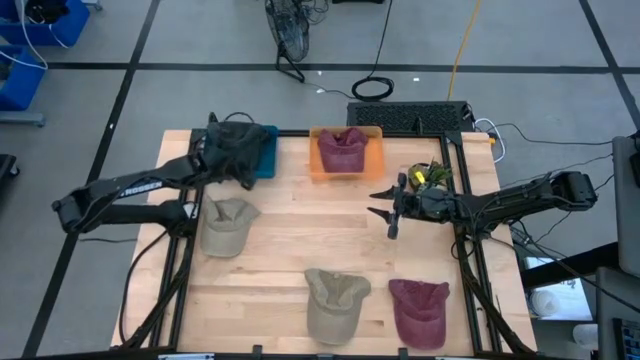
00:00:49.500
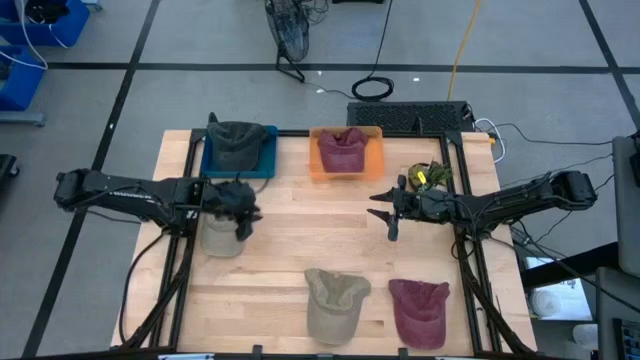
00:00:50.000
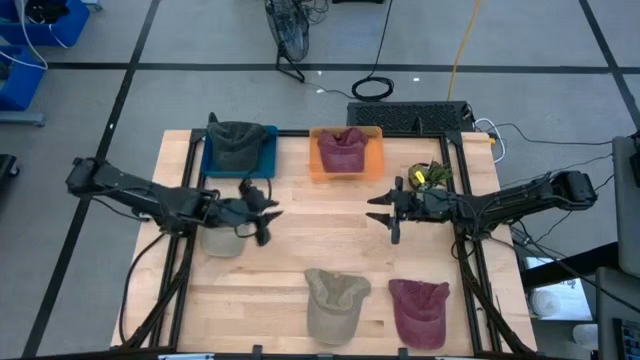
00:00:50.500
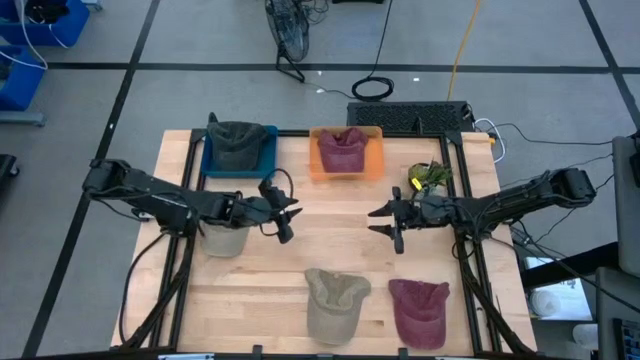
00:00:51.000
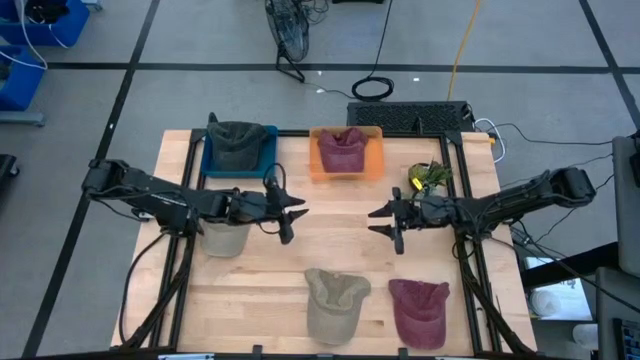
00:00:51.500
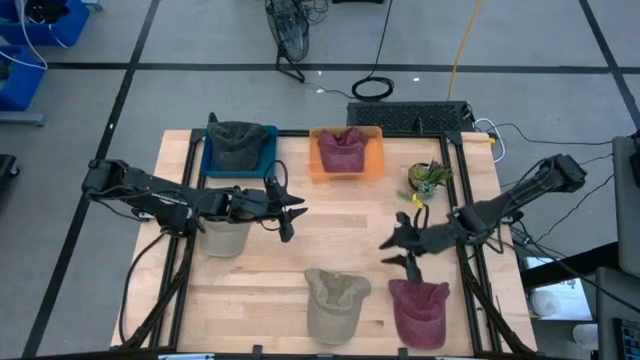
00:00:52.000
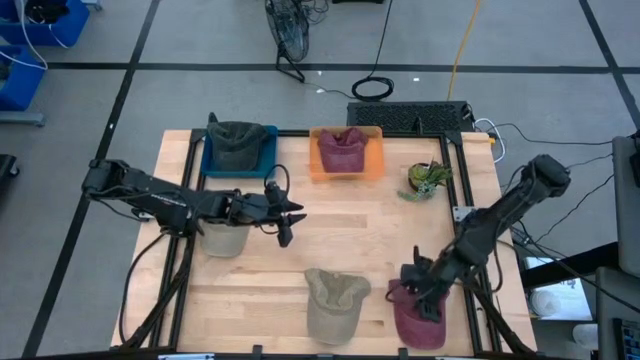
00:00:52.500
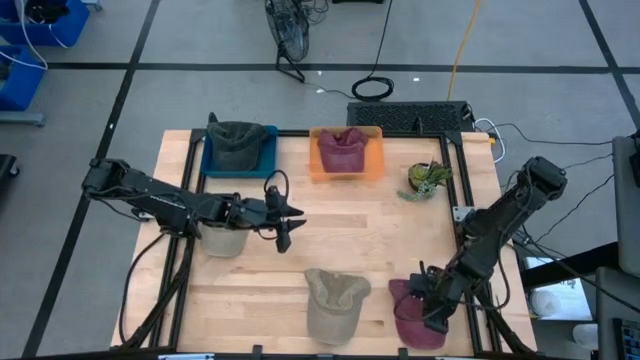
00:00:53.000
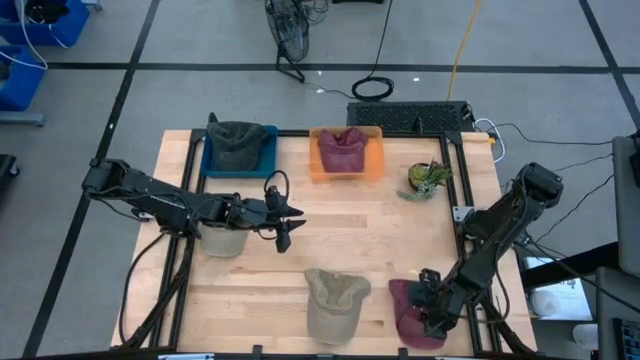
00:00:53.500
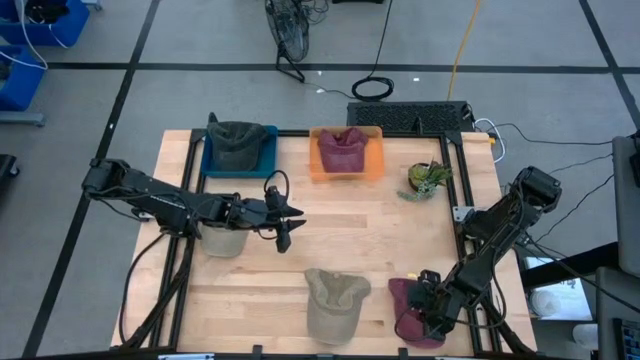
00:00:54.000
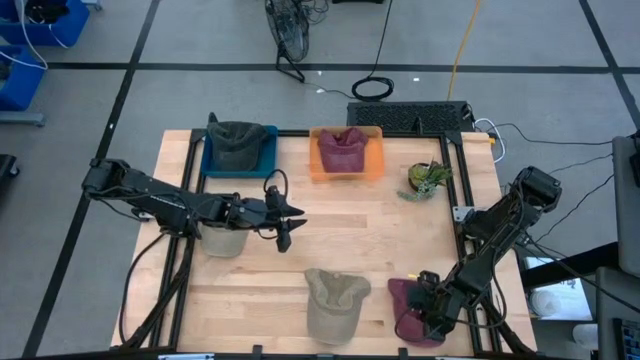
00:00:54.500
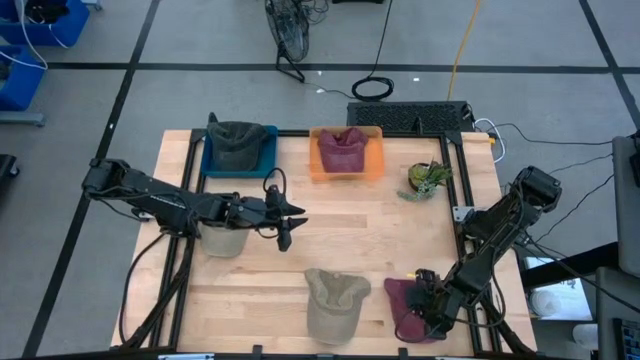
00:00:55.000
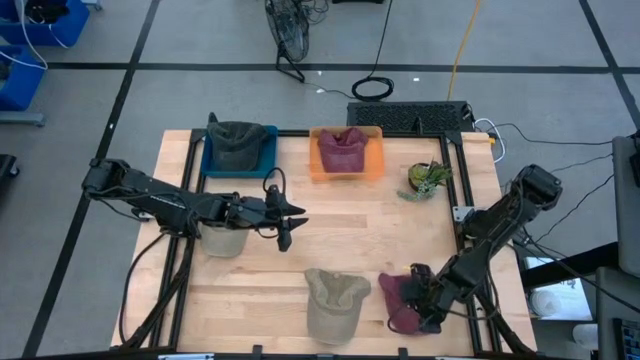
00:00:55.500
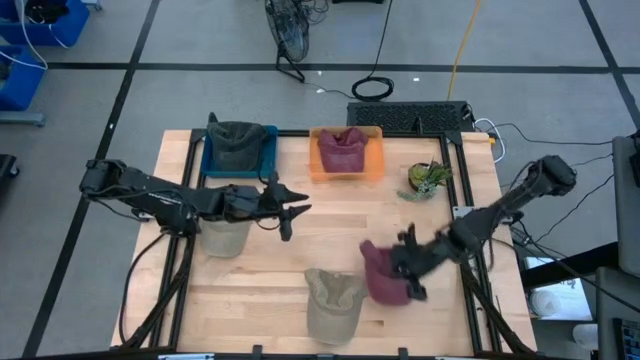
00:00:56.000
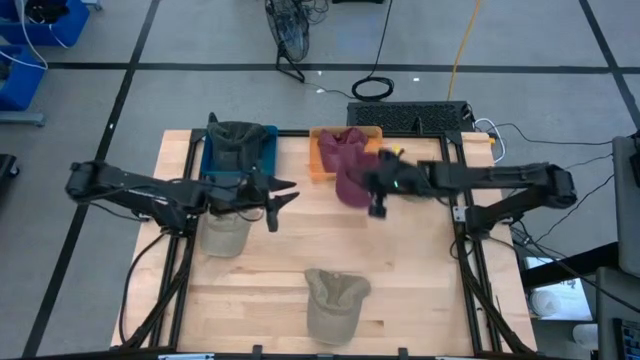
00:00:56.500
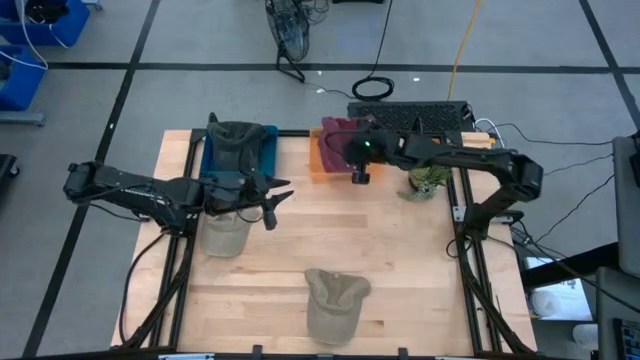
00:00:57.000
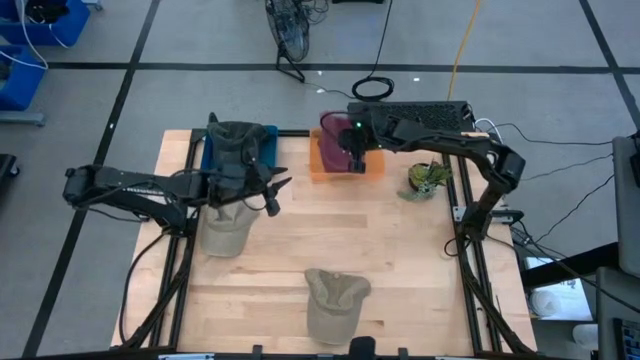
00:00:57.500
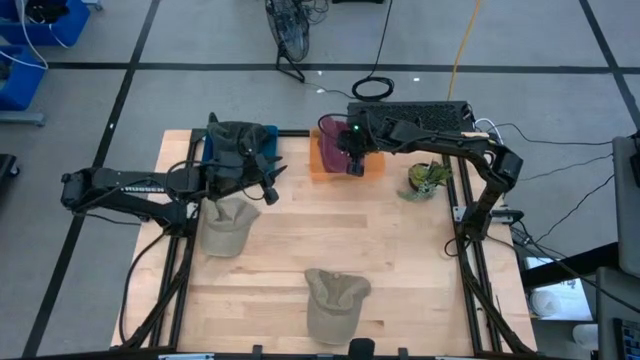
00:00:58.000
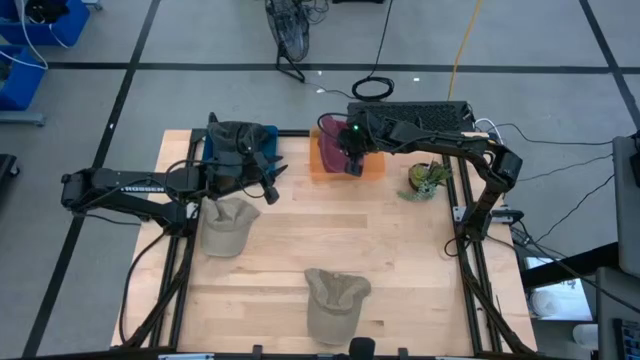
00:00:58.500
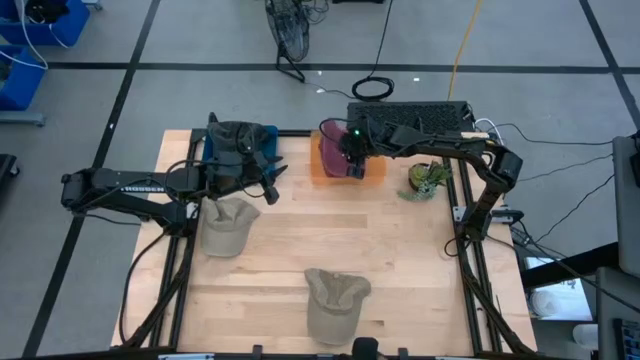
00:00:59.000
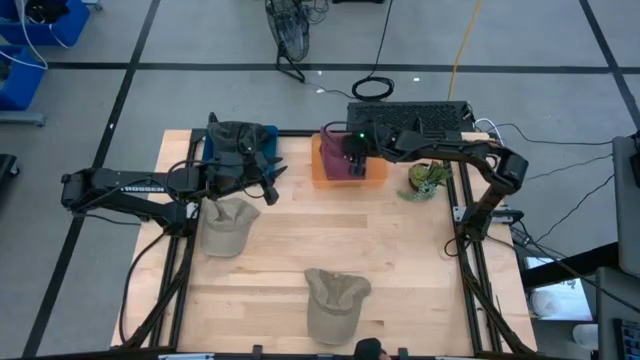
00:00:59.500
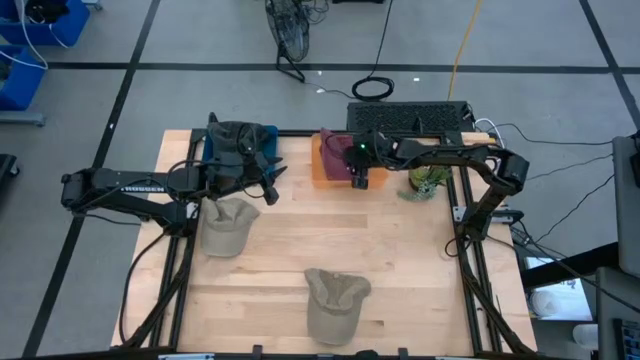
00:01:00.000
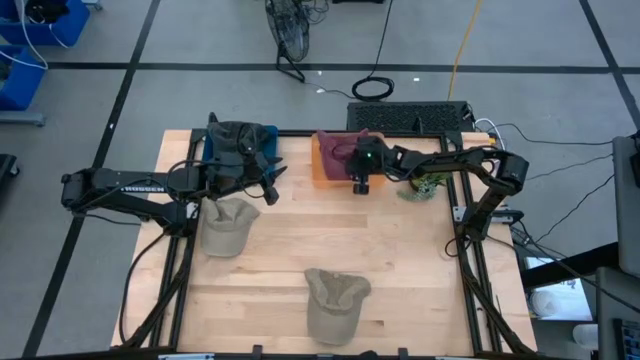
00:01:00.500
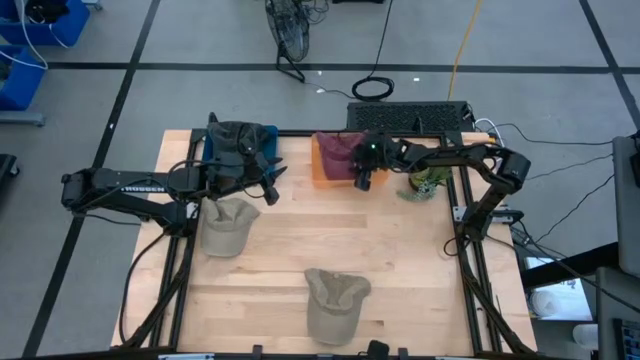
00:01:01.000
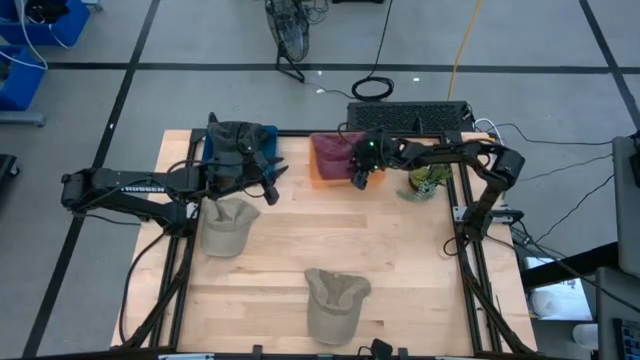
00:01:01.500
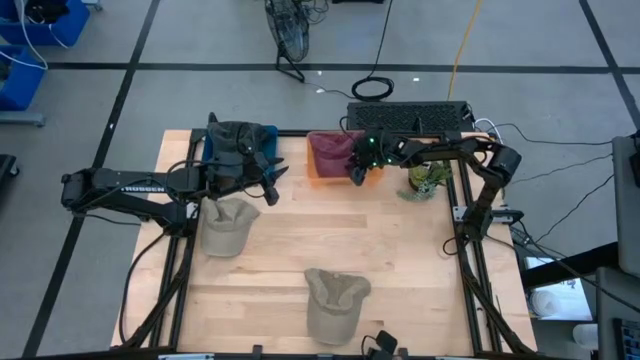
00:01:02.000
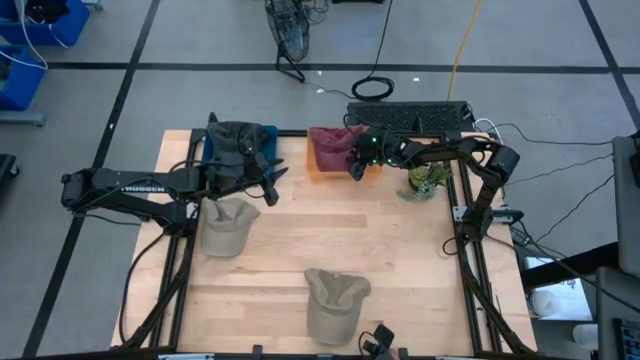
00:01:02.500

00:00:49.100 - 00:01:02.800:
Task: Pick & Place hat
Put the red cap into the orange bin

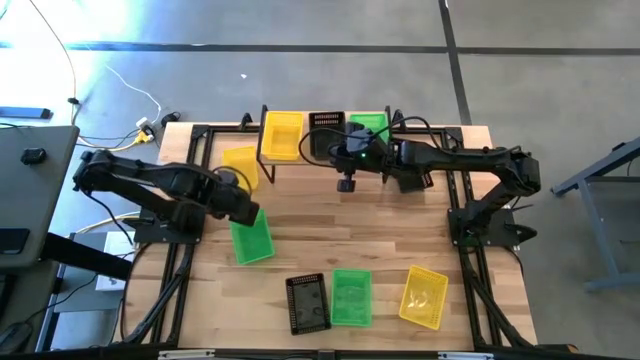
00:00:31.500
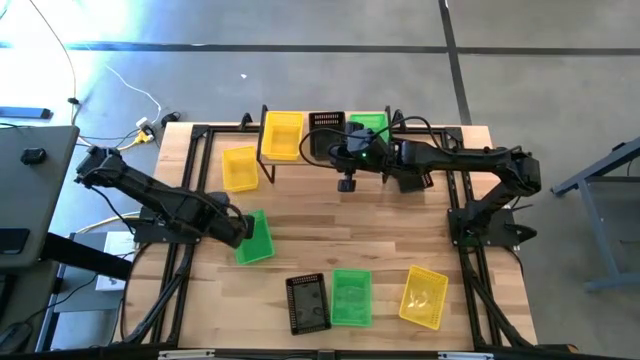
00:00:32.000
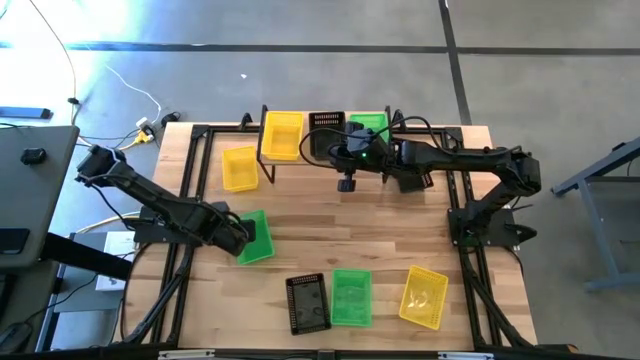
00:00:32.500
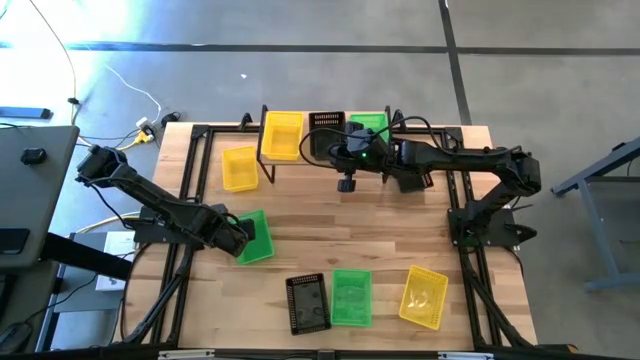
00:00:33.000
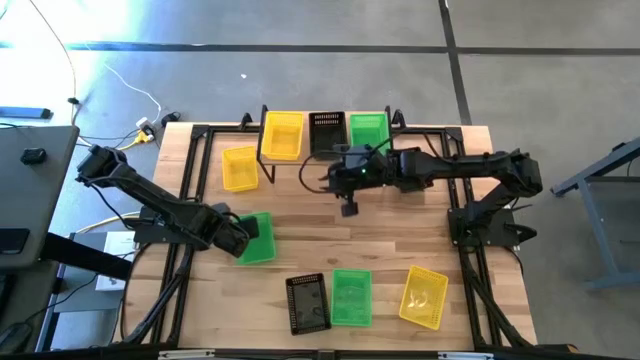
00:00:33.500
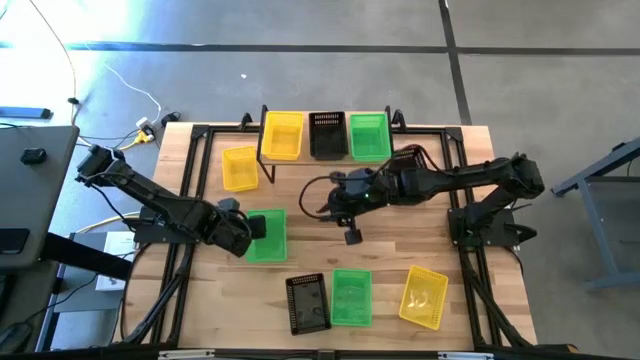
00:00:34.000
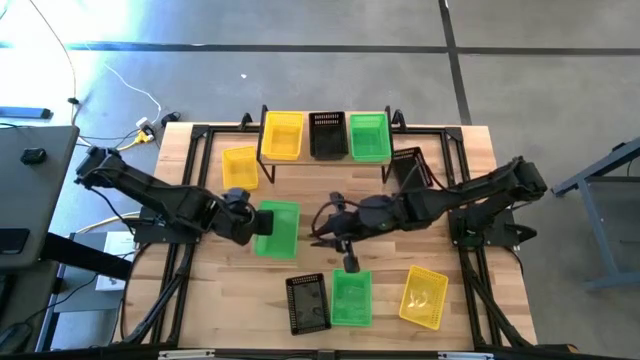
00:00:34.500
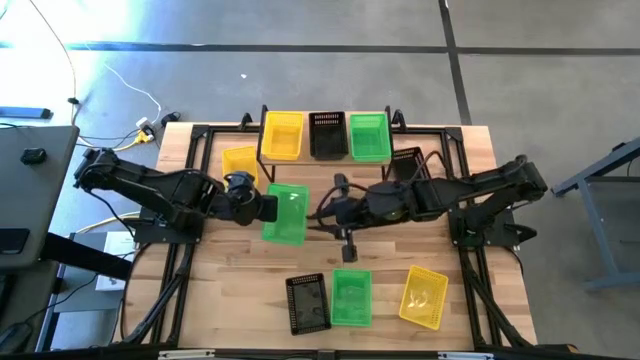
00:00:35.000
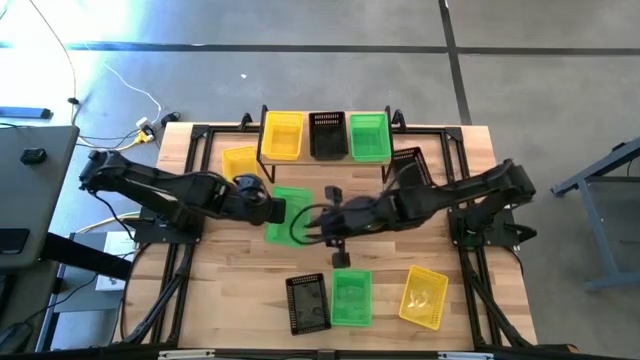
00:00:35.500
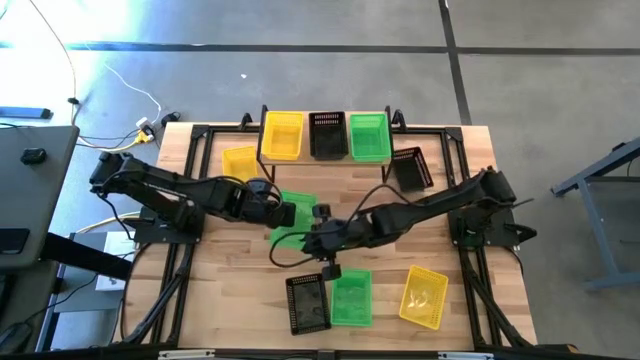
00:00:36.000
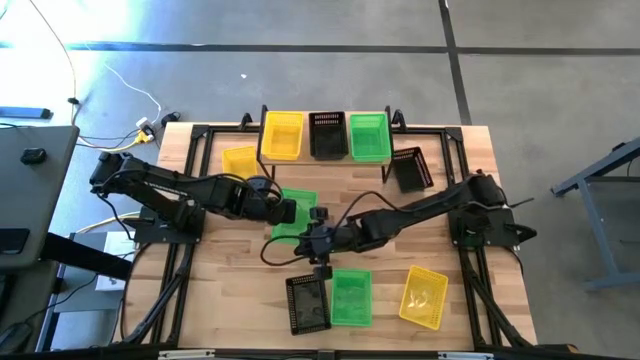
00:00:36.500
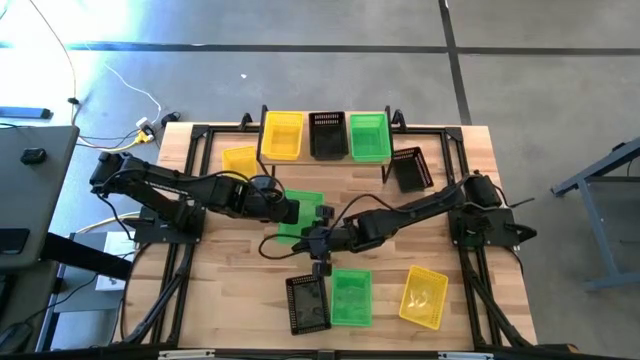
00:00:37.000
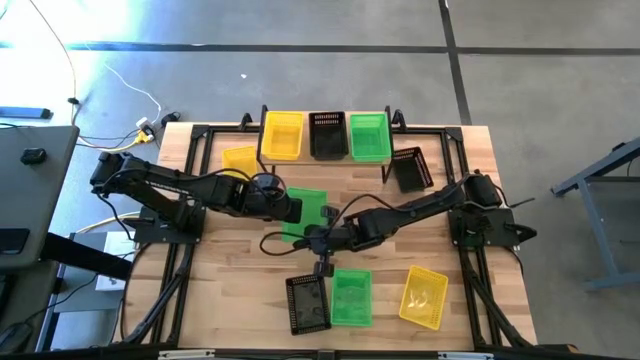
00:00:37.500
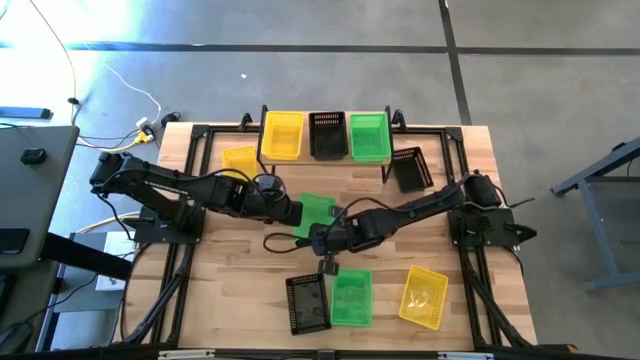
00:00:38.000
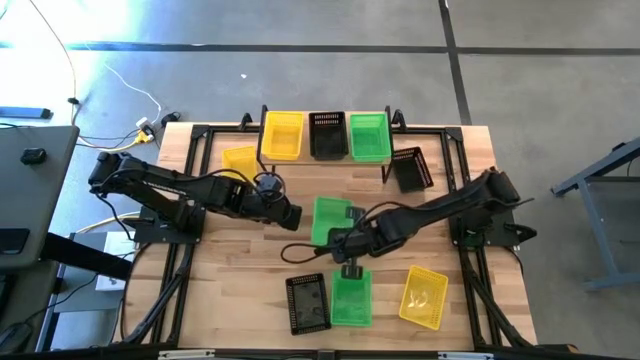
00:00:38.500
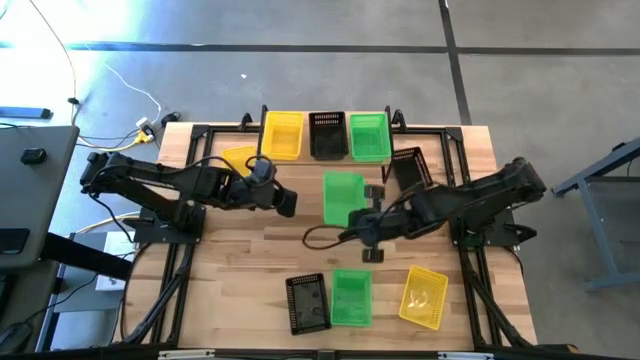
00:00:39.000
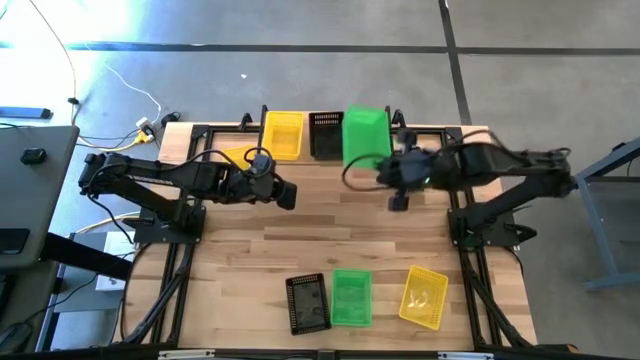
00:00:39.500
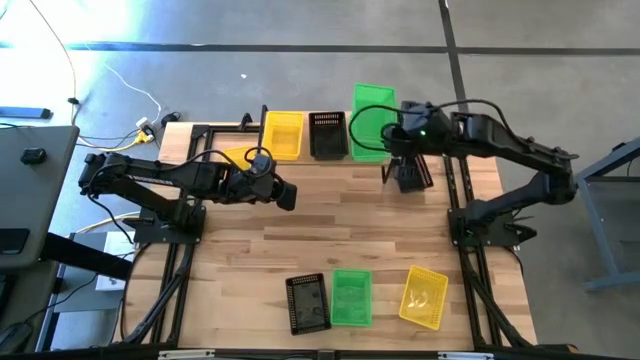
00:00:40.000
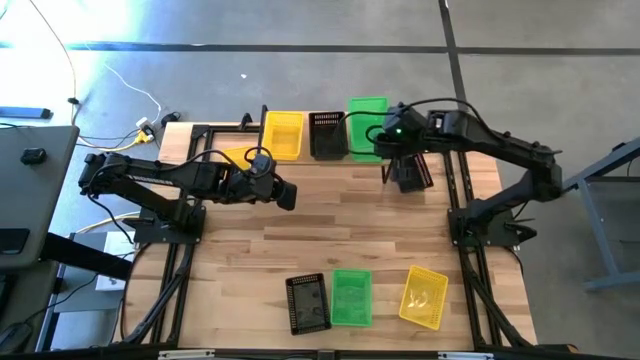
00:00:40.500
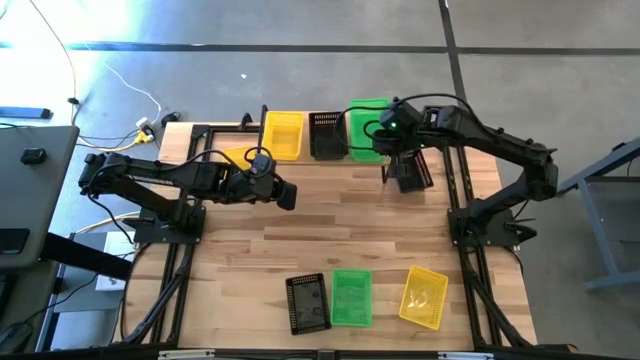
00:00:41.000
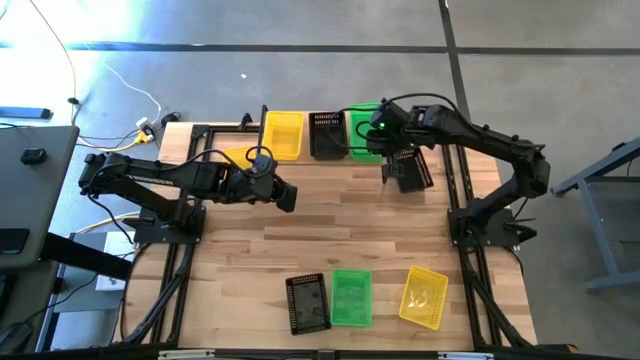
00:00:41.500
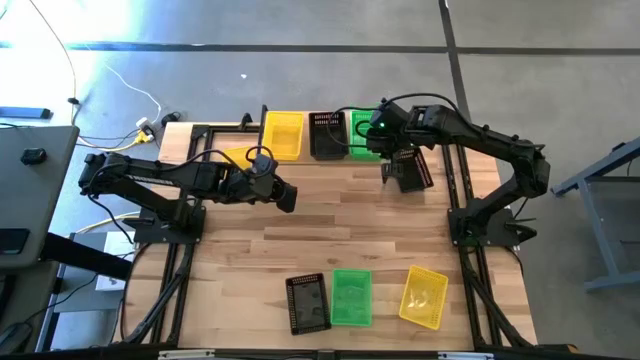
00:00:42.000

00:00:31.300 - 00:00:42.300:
Task: Stack baskets on shelf by color
Stack the left green bin on the other green bin on the shelf
